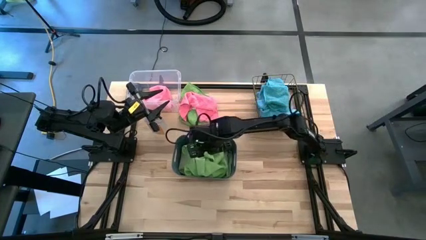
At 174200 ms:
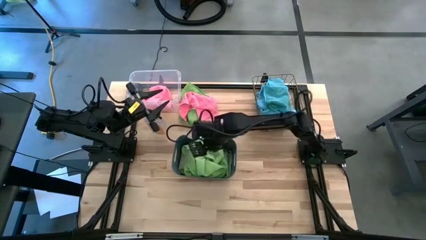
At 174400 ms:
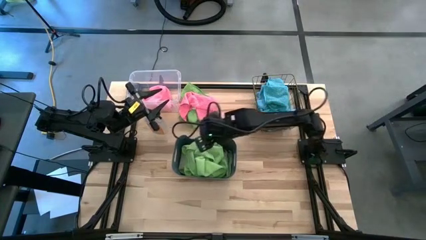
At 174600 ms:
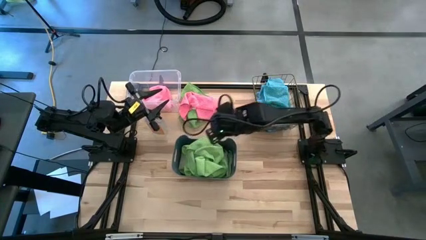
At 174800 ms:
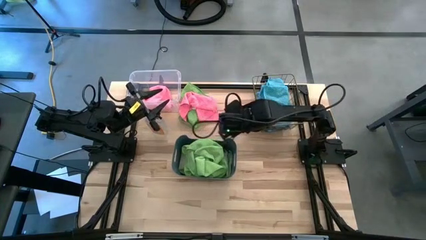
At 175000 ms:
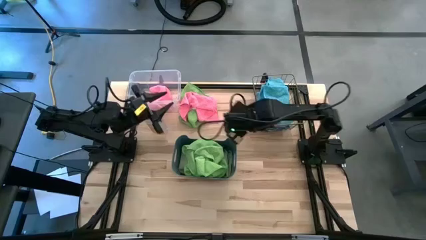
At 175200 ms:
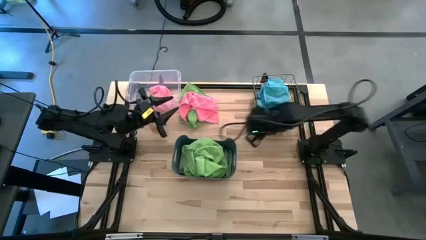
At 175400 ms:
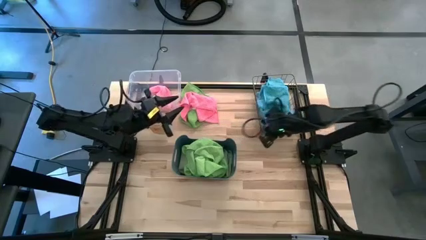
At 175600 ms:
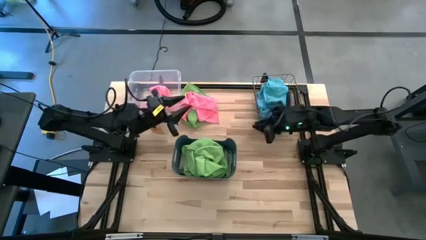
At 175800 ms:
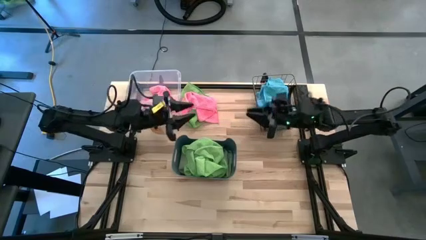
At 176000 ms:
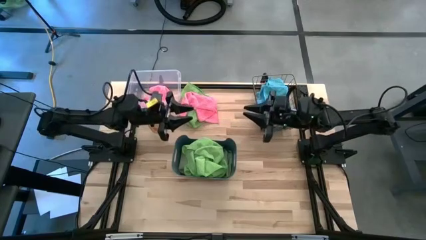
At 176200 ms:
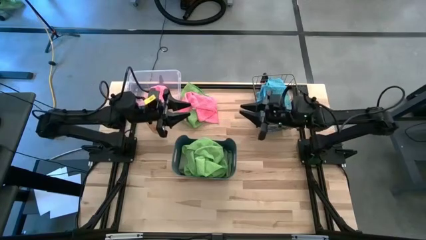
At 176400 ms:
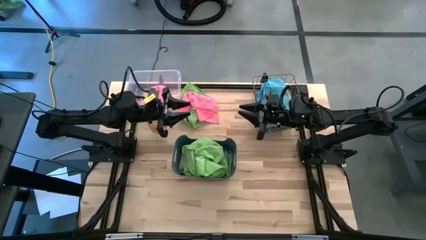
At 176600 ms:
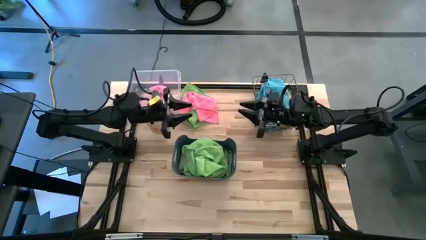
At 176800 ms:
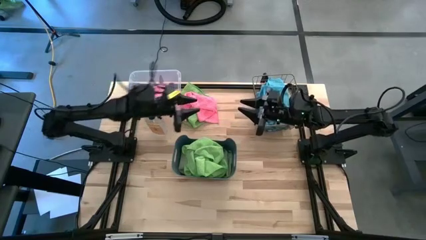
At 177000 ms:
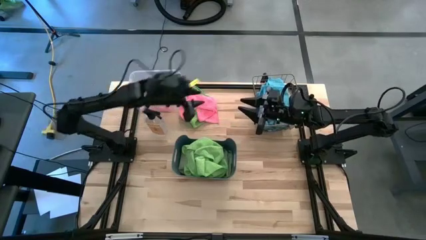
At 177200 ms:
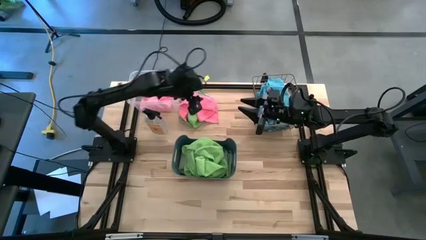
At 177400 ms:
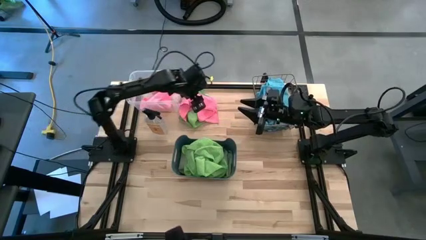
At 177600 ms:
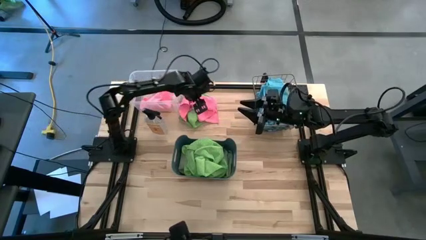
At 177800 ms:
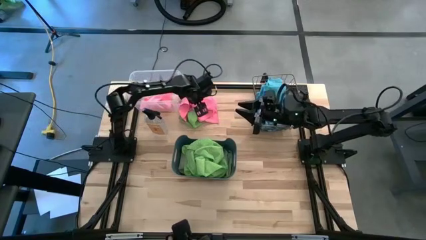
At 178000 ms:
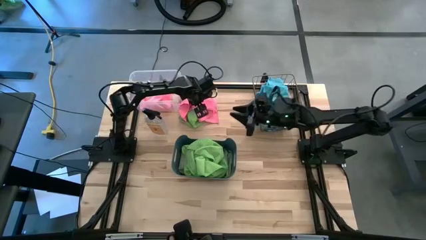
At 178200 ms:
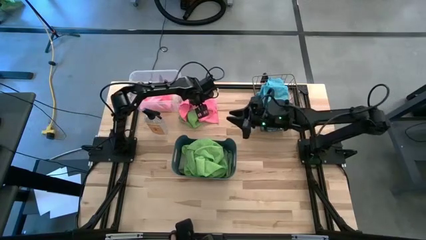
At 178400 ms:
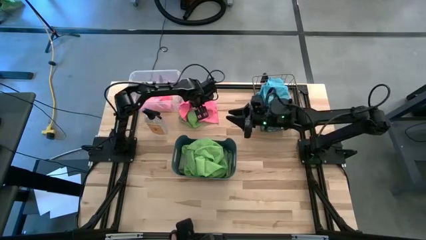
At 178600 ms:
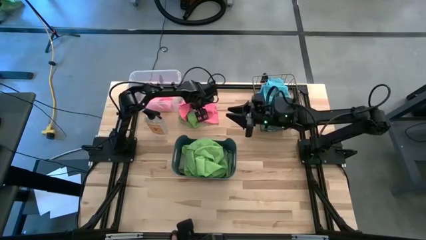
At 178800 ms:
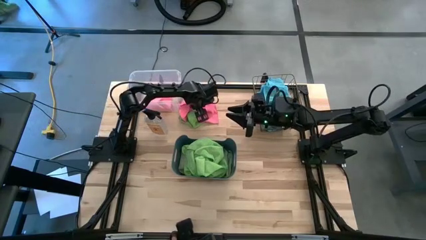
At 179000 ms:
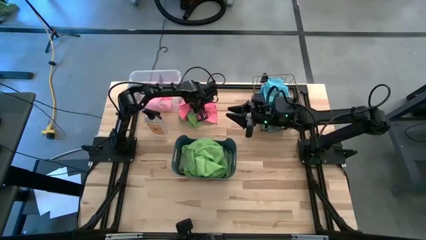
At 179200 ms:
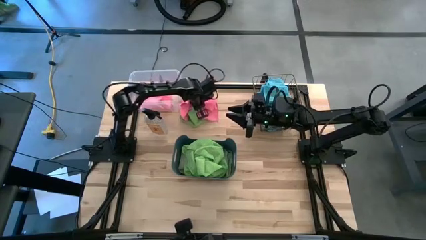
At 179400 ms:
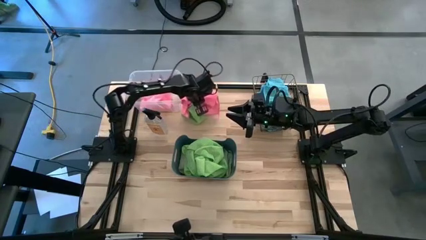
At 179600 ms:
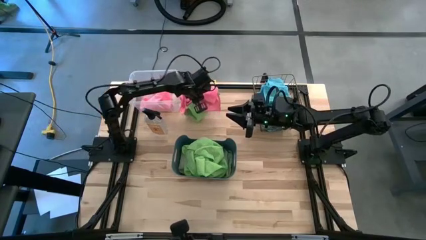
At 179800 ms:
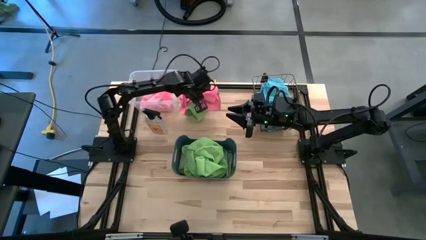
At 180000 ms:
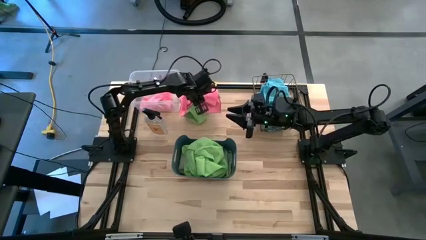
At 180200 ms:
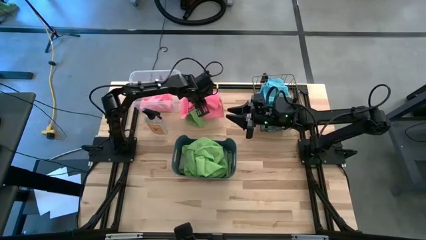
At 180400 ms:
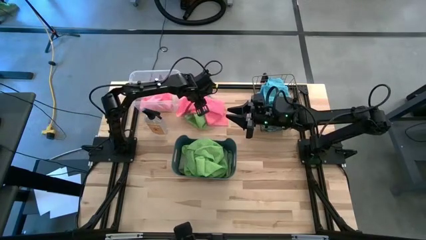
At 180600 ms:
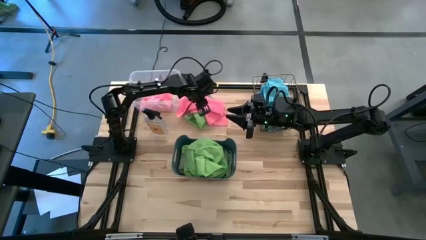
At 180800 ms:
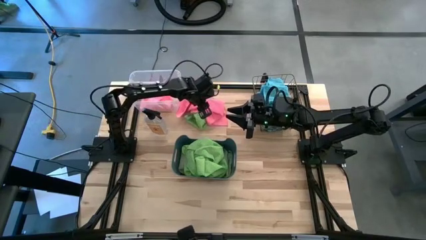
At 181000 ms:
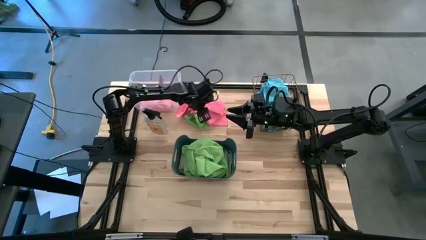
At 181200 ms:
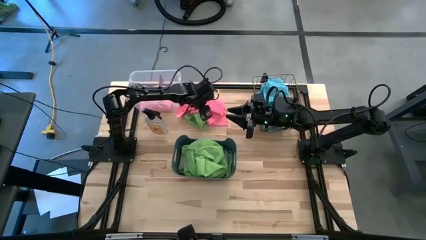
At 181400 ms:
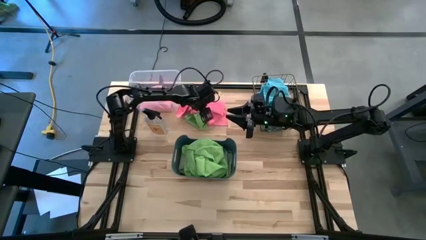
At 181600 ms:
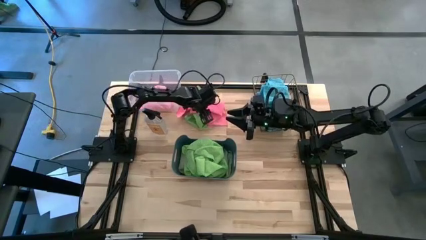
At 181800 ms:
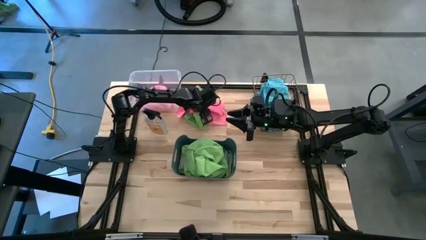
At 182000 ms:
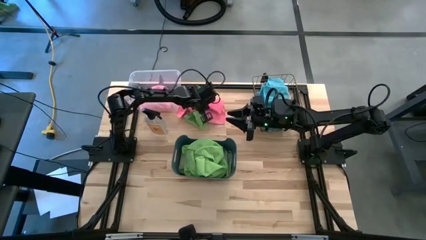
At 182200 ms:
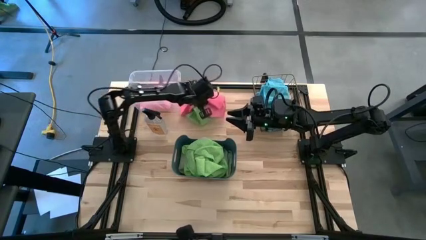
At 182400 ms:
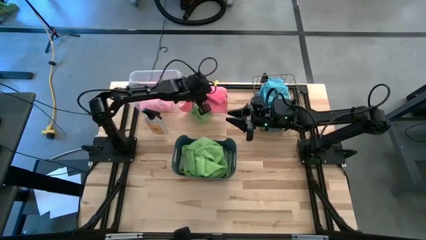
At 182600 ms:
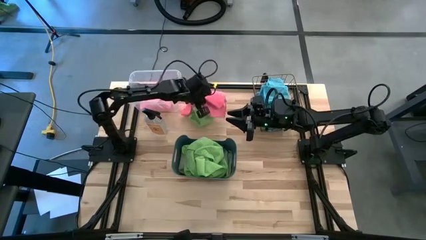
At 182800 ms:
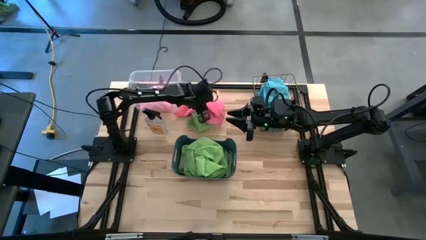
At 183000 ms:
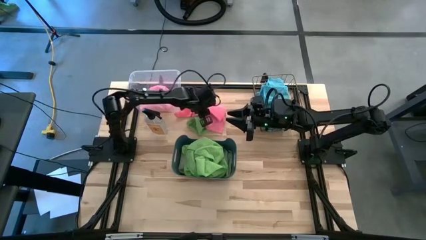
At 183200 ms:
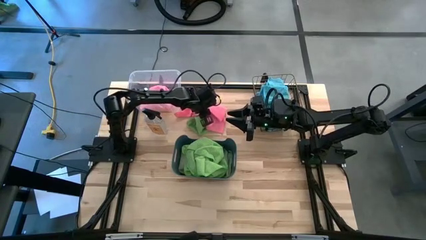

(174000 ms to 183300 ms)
Task: Sort microfiber towel by color & place in baskets
Put the pink microfiber cloth into the transparent bin

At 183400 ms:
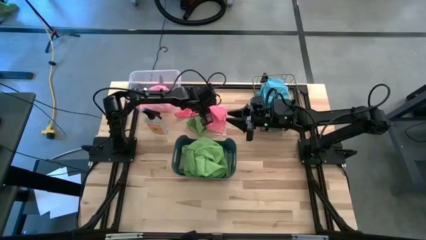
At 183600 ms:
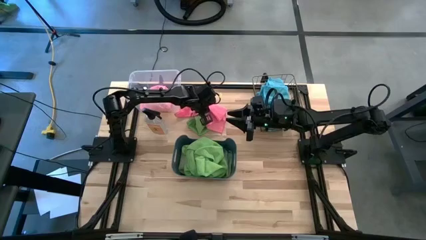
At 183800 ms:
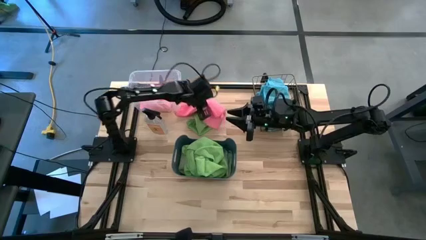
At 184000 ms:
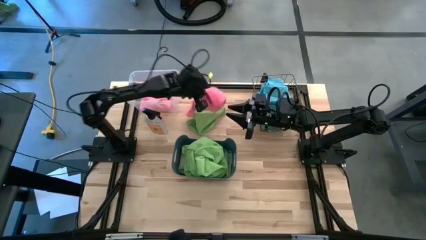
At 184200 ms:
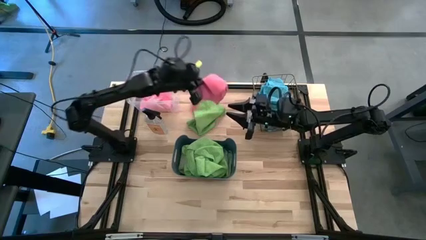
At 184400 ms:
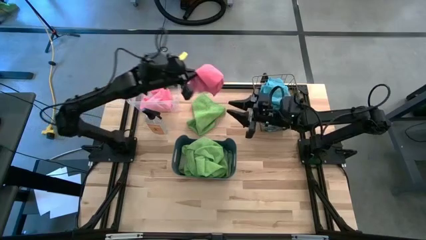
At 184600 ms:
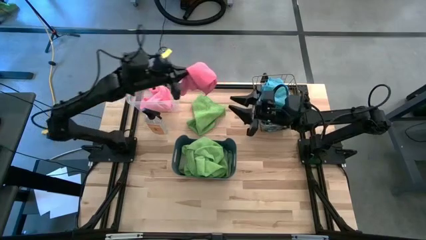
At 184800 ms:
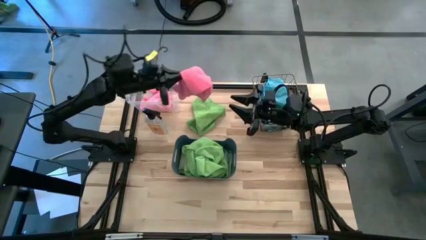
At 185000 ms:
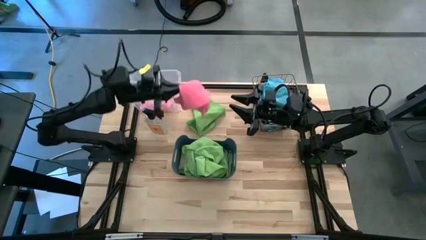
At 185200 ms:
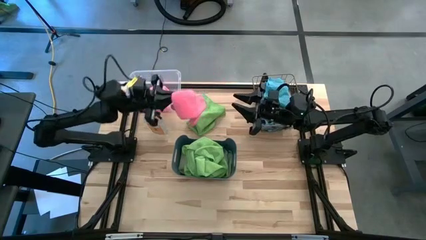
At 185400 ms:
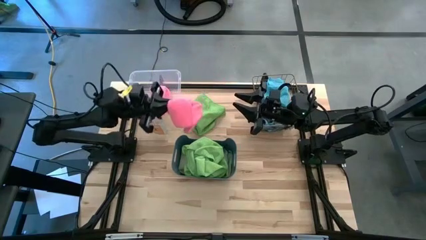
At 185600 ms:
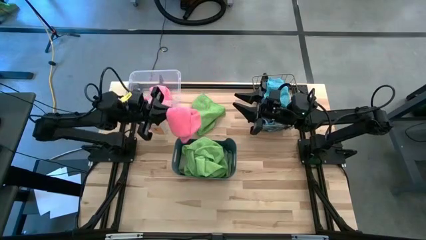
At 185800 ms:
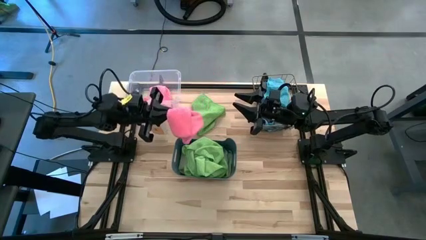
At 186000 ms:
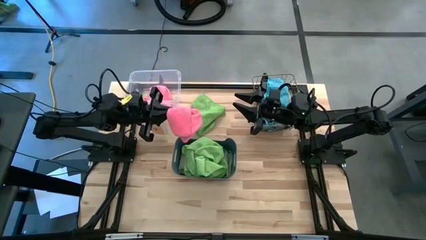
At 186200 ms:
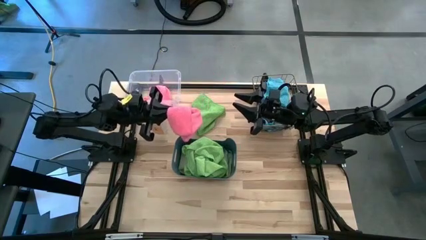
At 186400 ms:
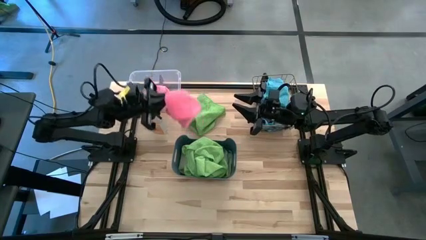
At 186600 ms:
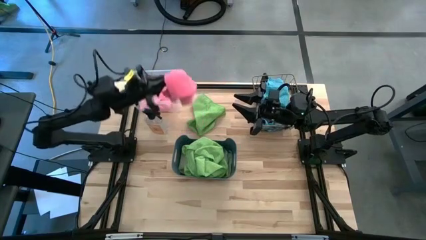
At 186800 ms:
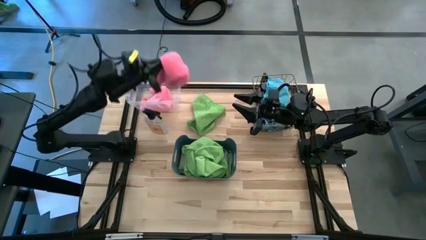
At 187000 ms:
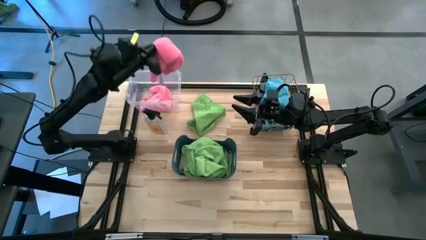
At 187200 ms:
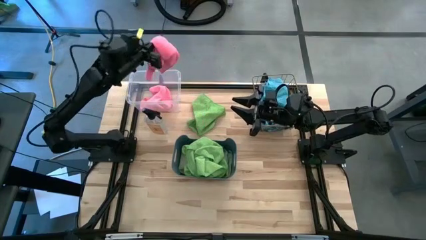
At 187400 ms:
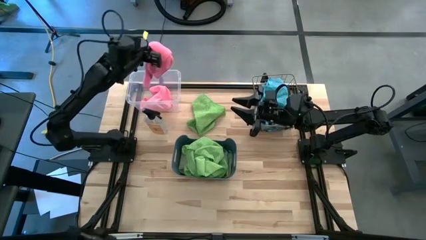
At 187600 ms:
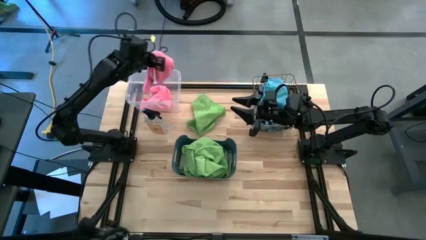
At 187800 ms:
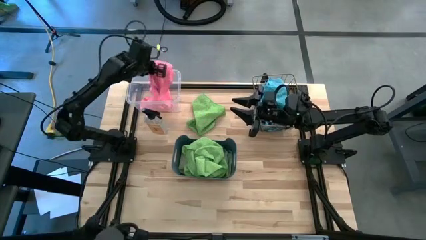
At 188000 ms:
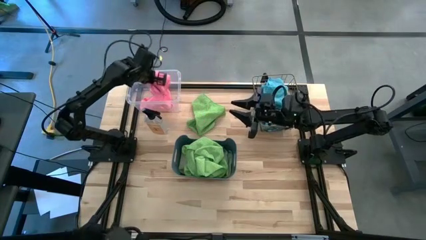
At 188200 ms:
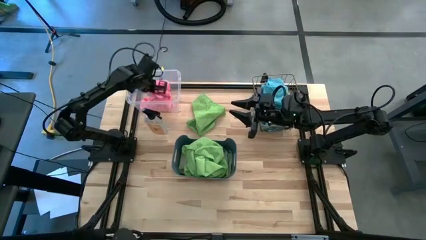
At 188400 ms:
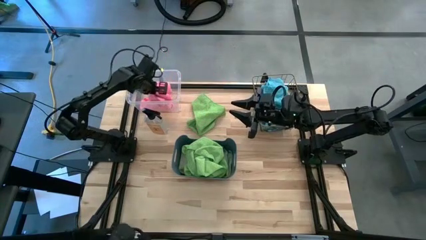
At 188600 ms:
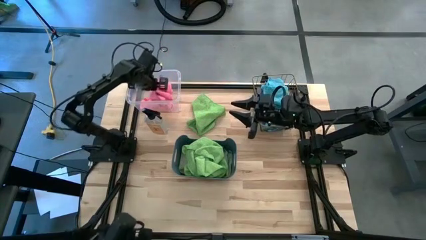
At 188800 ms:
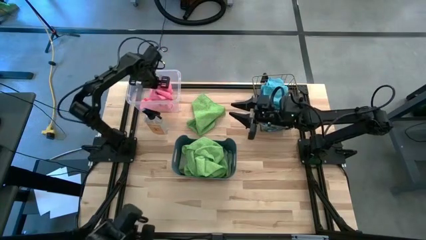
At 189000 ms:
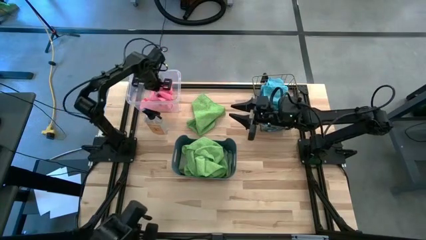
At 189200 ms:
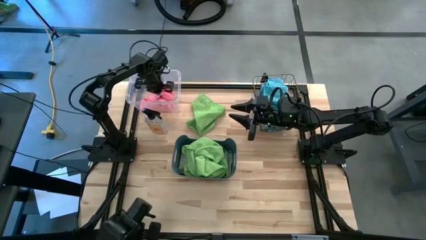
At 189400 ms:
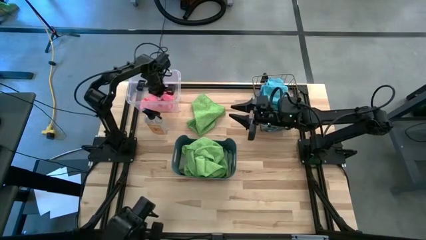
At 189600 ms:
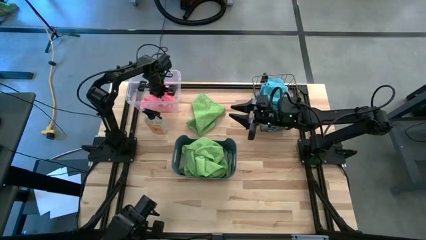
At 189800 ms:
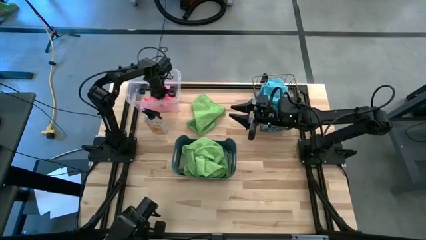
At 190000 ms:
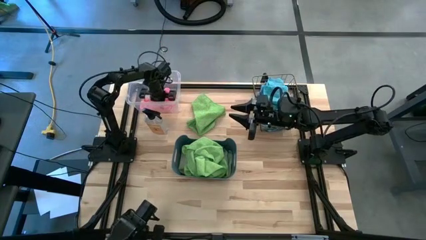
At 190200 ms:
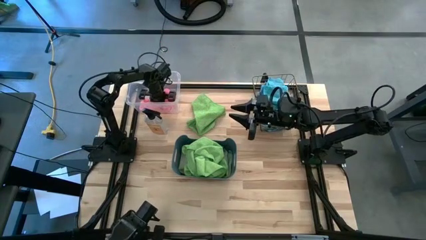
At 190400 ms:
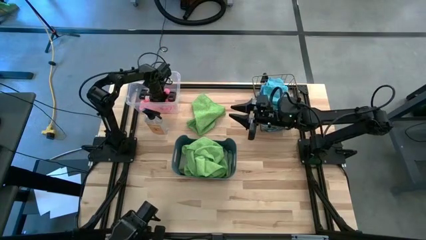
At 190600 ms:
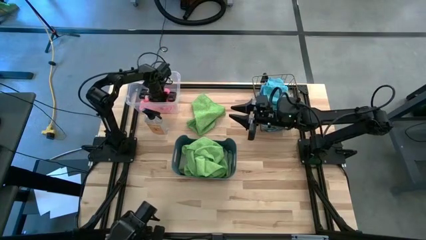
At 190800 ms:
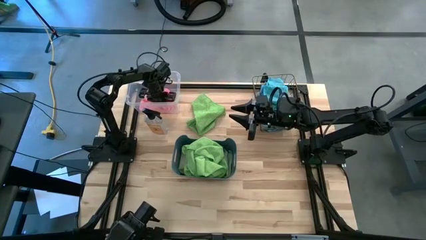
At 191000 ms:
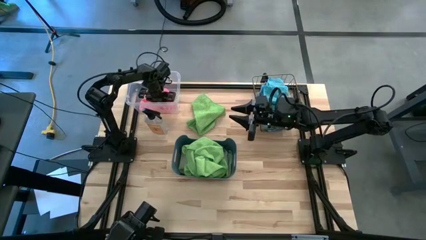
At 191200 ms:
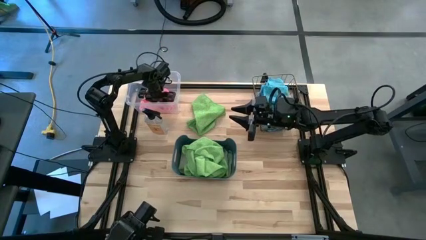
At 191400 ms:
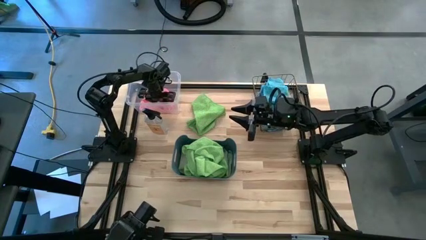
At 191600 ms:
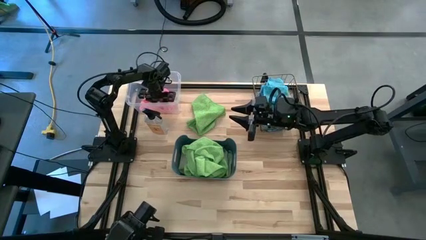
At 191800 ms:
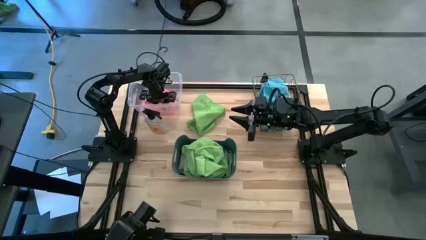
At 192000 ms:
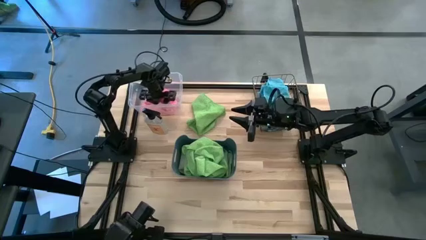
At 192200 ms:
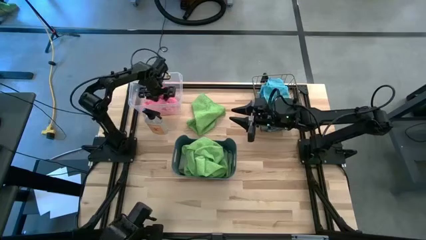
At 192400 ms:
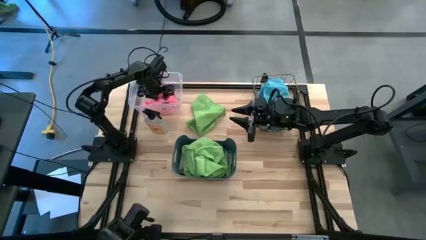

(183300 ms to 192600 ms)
Put the pink microfiber cloth into the transparent bin
